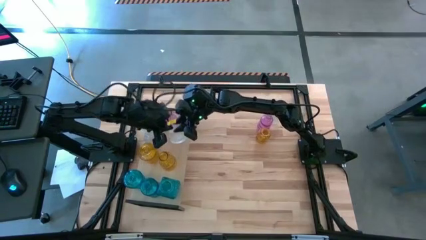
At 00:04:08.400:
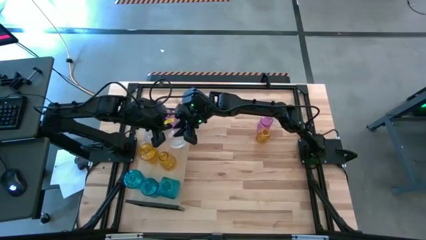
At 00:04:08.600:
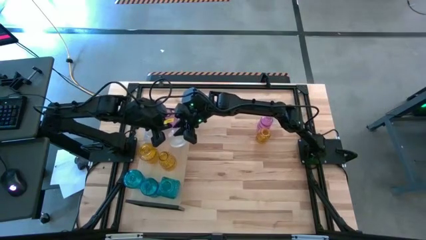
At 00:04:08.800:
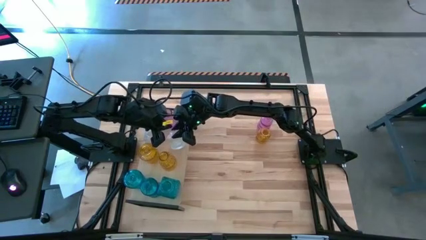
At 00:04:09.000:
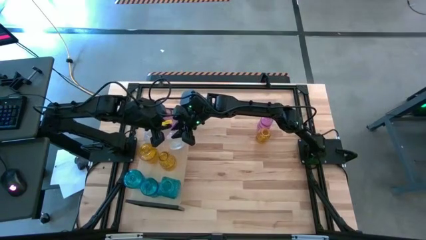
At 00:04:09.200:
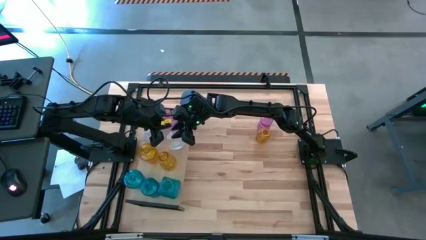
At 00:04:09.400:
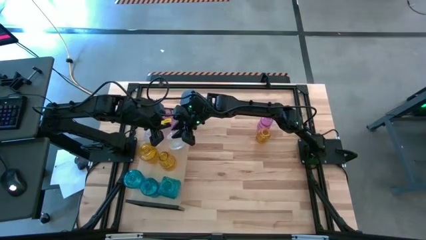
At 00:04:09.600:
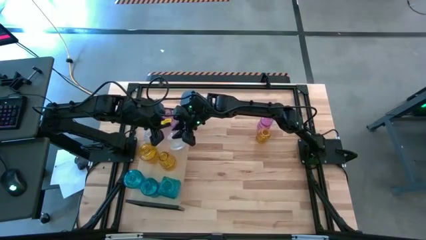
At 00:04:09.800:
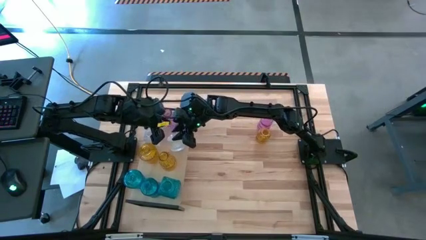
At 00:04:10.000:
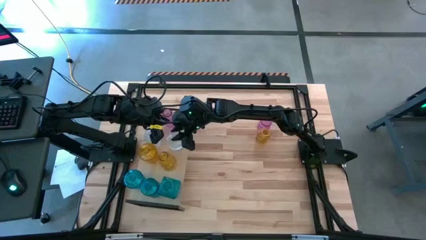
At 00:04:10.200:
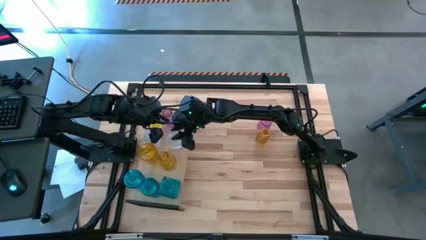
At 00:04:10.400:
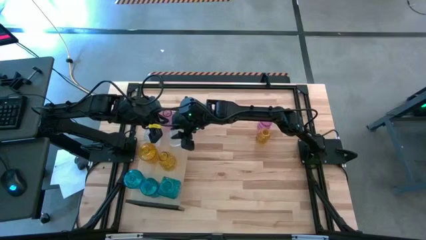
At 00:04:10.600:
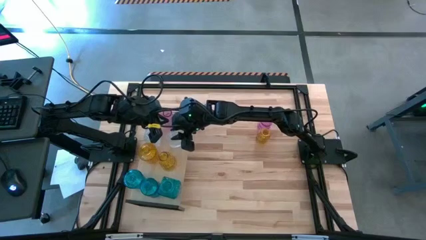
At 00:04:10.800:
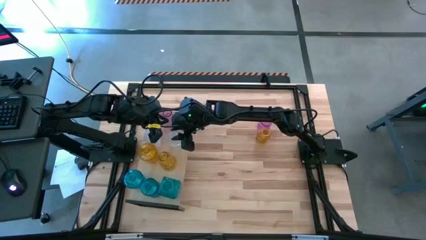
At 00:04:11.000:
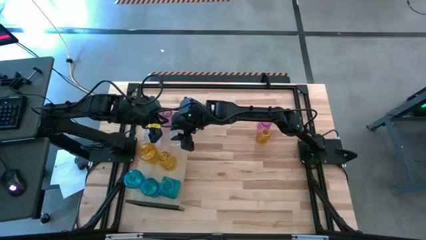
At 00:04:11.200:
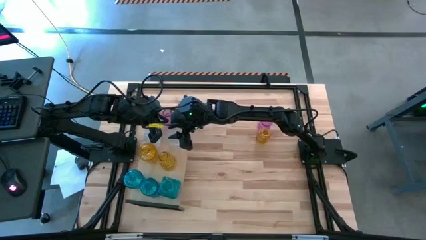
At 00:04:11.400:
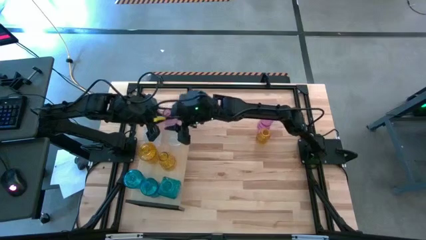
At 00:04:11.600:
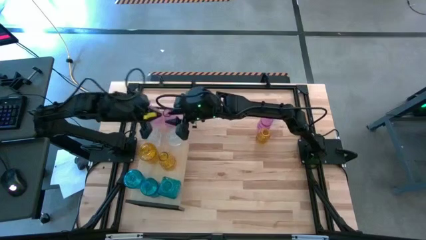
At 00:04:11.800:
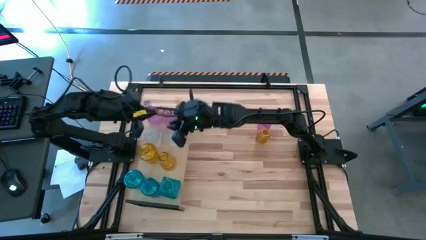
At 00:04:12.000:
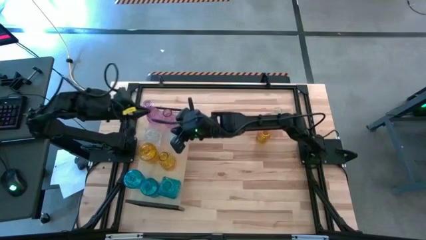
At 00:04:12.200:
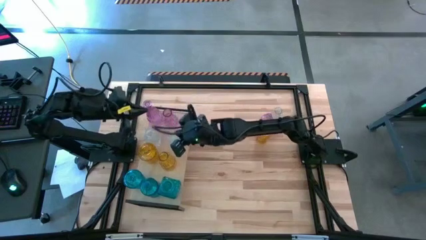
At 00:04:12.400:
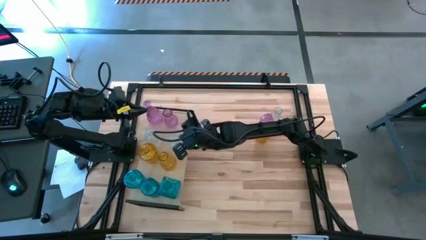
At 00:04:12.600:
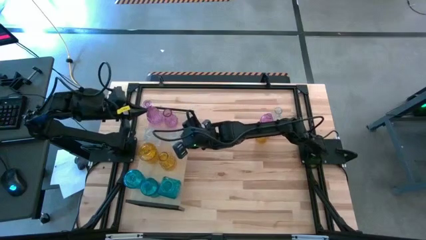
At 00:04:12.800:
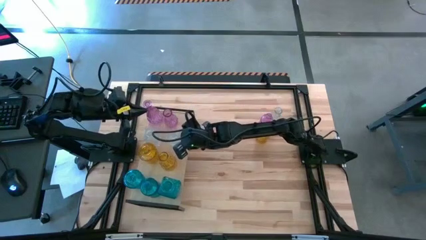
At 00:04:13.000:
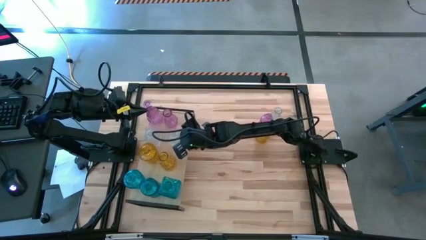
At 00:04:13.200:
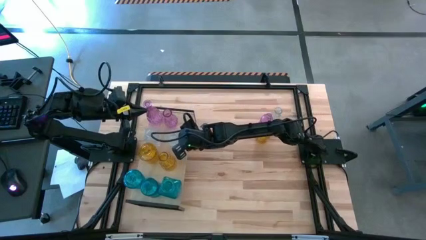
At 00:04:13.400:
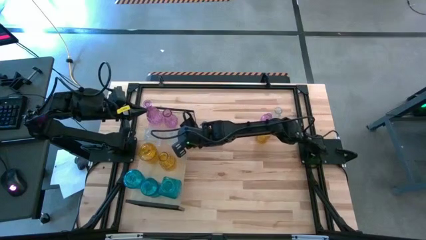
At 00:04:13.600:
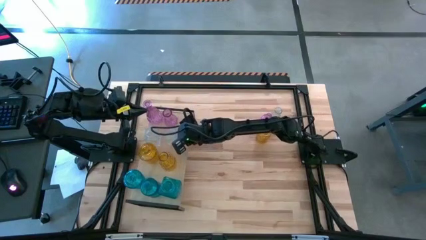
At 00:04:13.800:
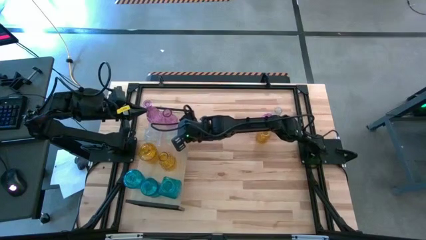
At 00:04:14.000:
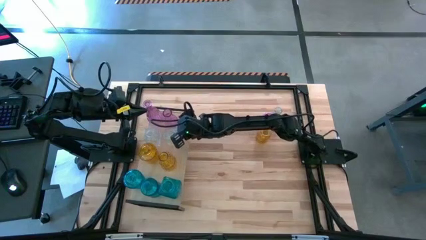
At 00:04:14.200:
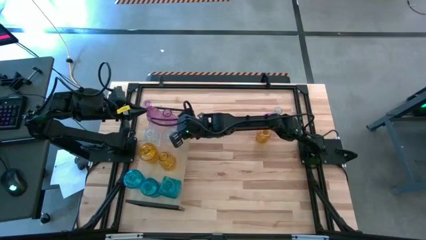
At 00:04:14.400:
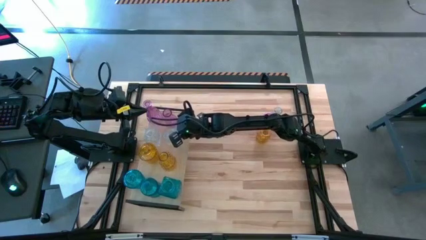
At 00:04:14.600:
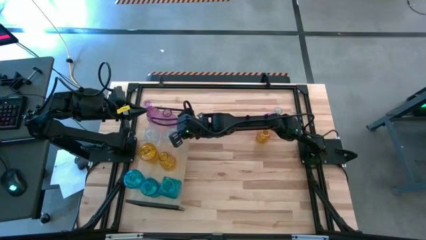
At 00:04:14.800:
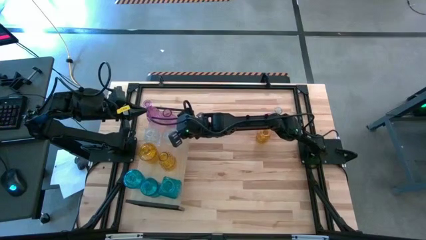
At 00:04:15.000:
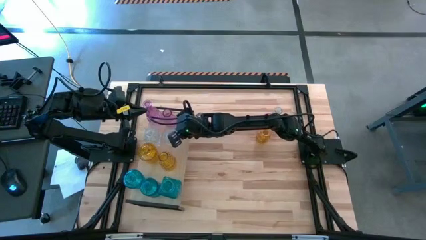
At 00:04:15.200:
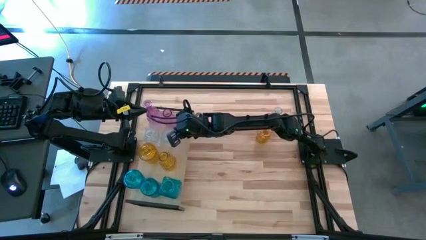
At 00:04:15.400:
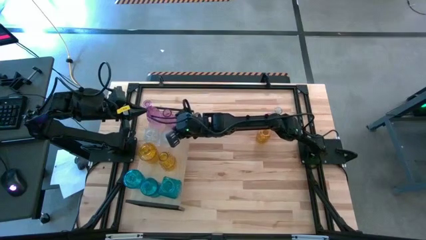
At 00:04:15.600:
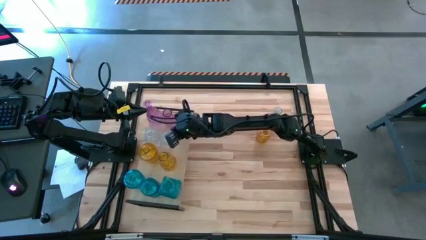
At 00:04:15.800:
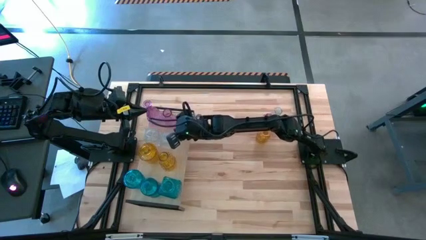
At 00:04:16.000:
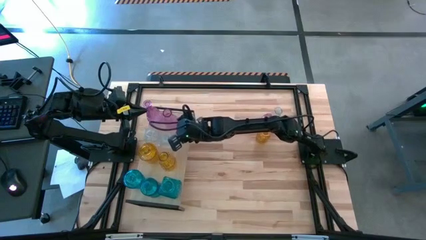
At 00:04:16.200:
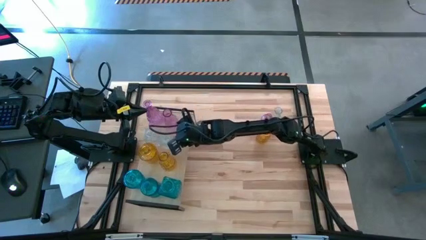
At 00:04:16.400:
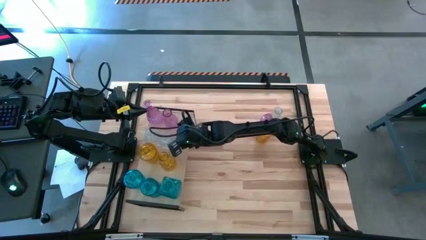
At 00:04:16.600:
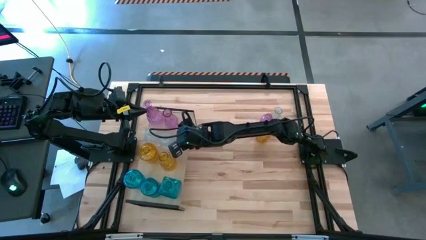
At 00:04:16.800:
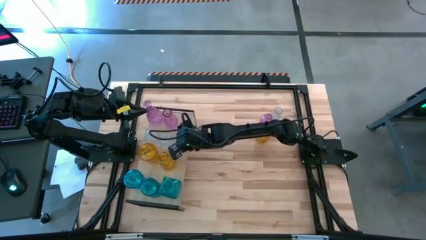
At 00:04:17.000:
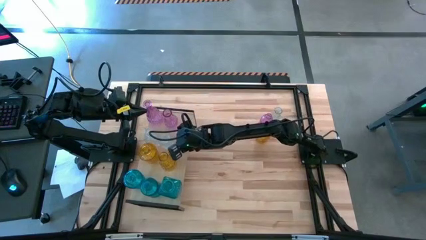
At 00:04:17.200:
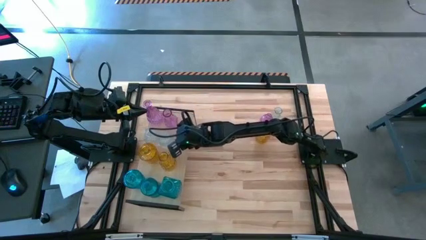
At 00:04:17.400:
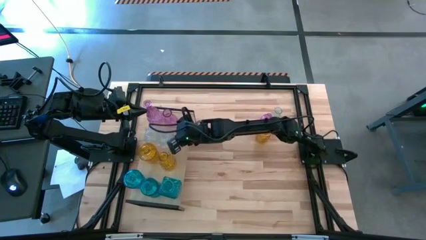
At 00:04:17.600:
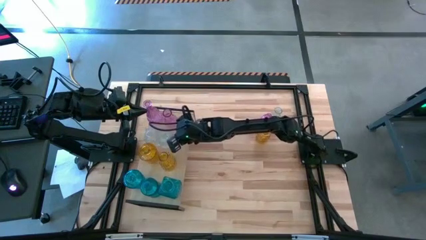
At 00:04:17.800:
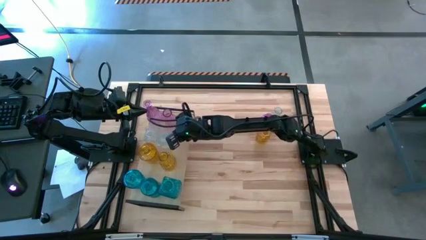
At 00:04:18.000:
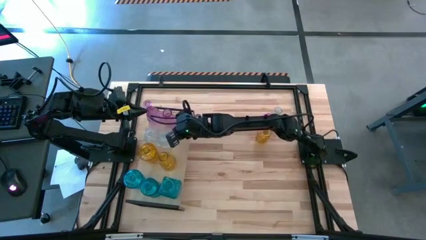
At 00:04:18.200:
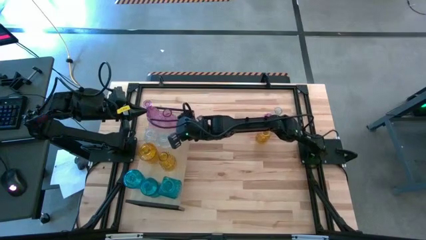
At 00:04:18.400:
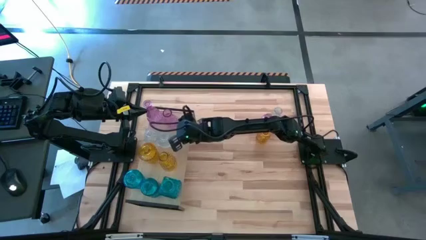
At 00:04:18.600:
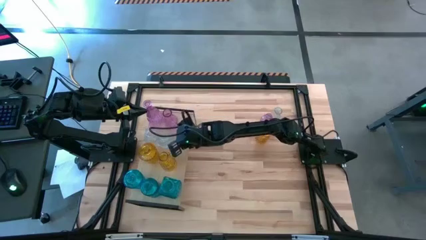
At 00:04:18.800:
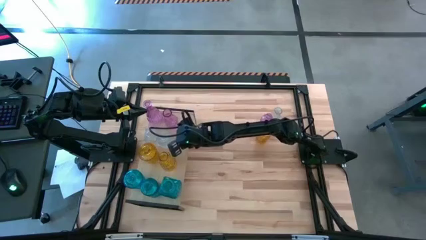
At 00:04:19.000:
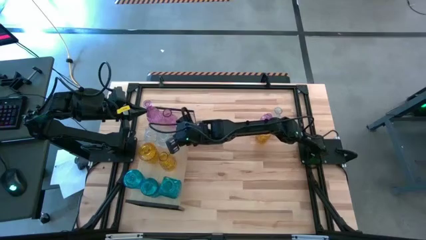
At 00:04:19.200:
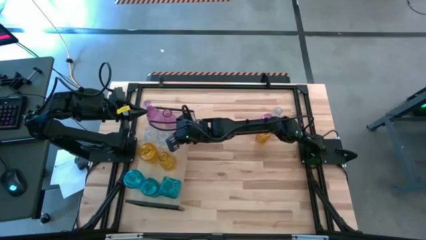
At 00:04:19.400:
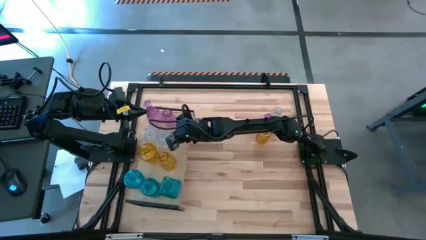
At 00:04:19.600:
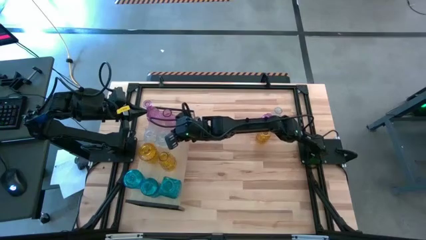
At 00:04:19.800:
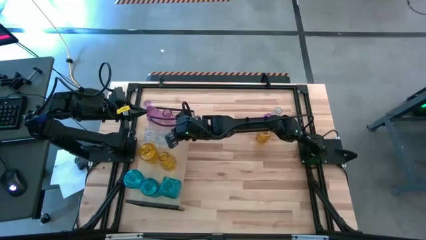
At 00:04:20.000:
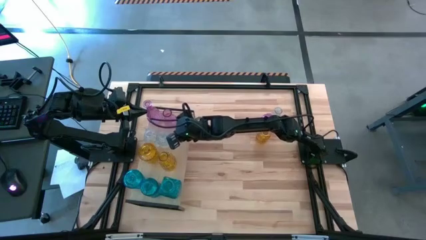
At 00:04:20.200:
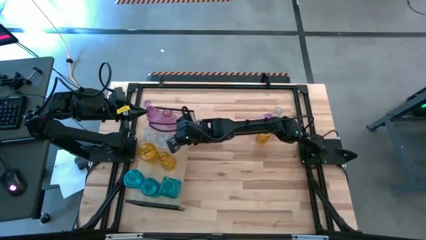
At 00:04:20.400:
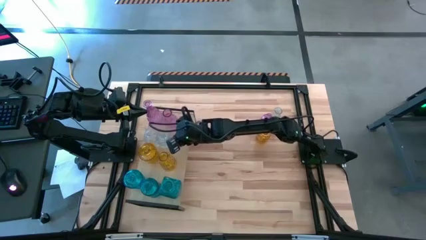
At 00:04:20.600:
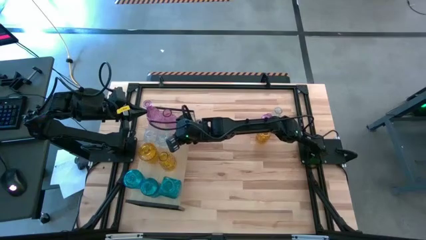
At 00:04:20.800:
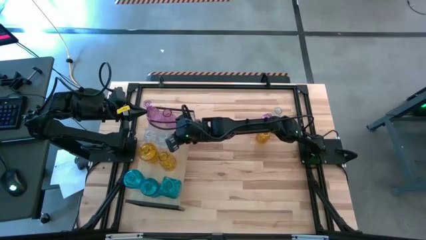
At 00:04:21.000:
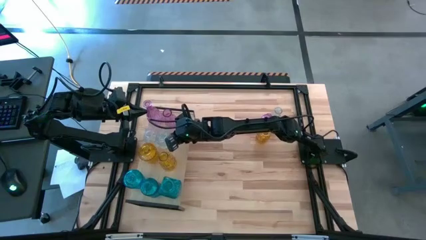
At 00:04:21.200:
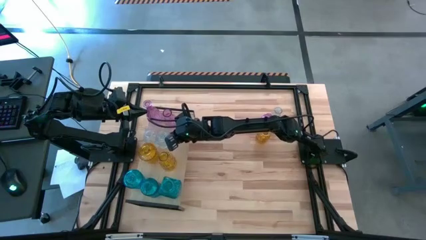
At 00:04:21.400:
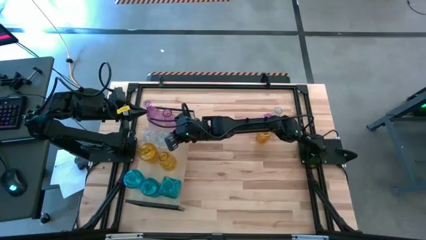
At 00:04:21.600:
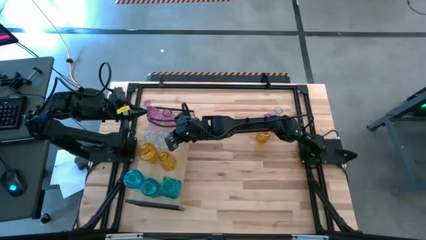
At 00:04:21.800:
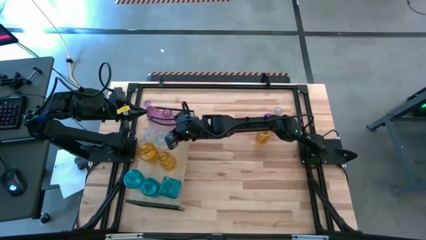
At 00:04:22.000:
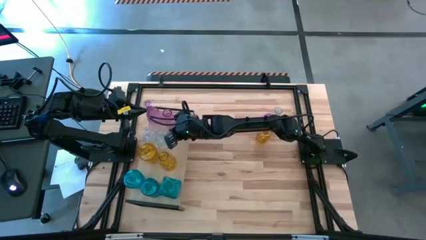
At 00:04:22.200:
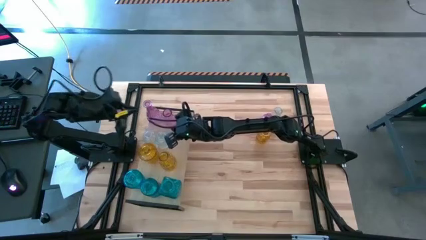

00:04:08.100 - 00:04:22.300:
Task: sort vases onto shelf
Put the left transparent flower vase on the shelf

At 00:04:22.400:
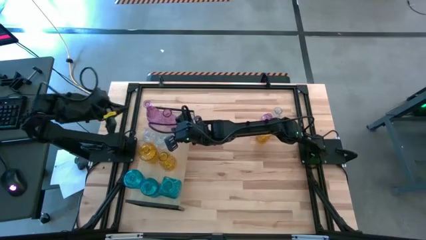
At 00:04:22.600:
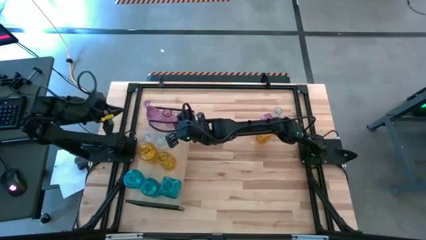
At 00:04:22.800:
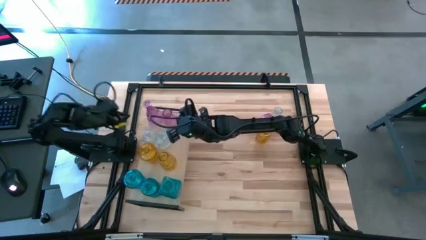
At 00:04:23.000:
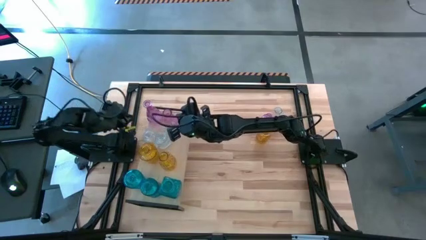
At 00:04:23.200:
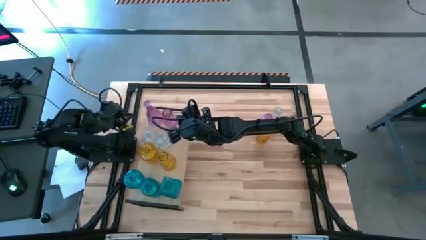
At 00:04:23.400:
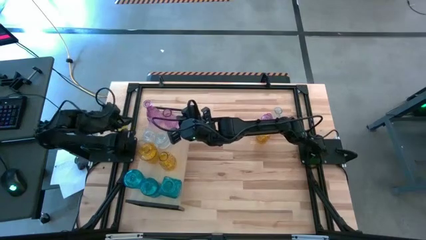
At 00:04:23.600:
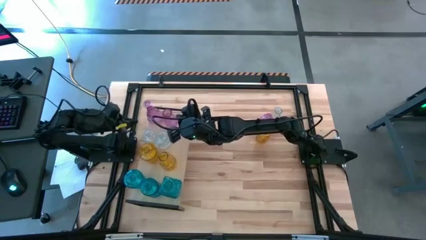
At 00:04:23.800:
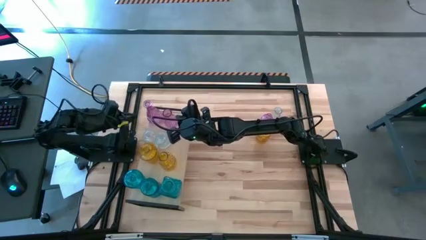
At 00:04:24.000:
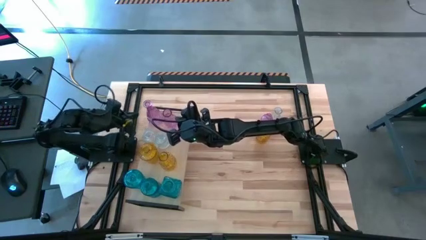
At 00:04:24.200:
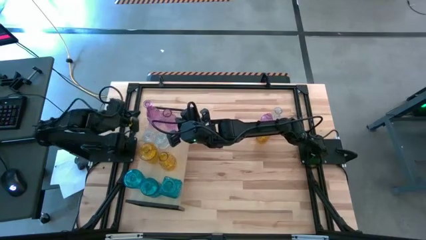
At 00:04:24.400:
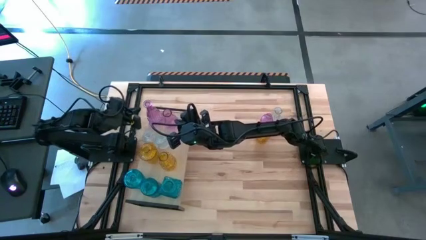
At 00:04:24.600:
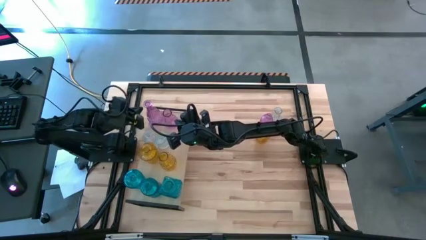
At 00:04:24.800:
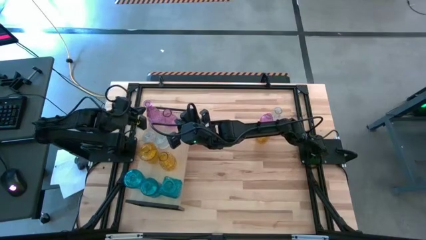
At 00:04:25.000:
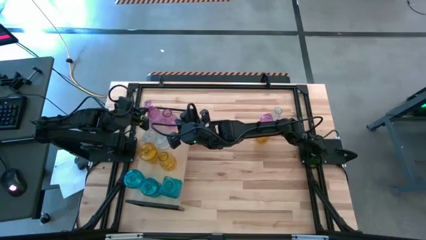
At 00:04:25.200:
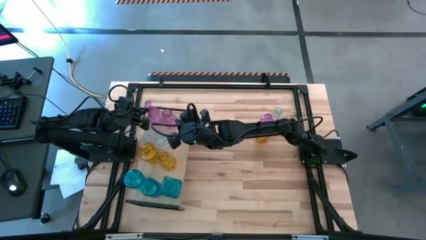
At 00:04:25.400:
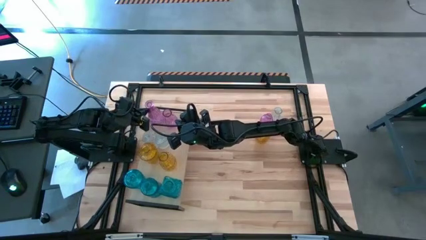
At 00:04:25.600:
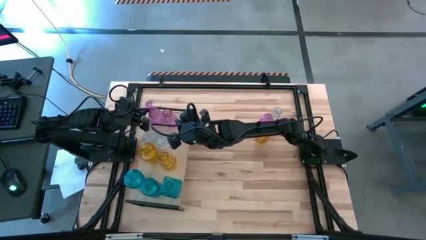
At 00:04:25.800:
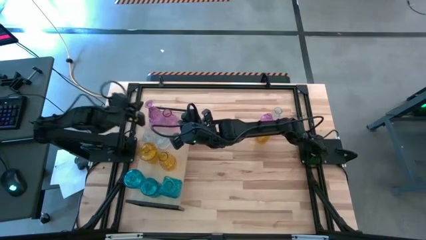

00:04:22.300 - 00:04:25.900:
Adjust the violet flower vase on the shelf
